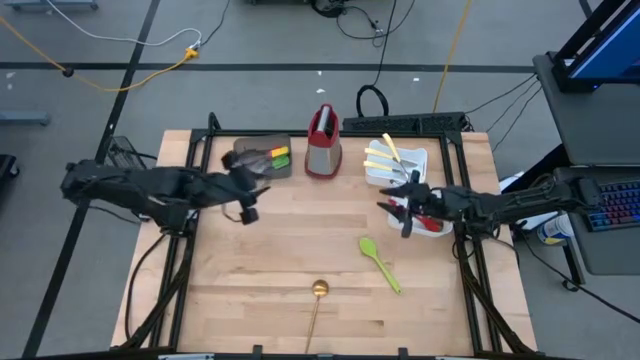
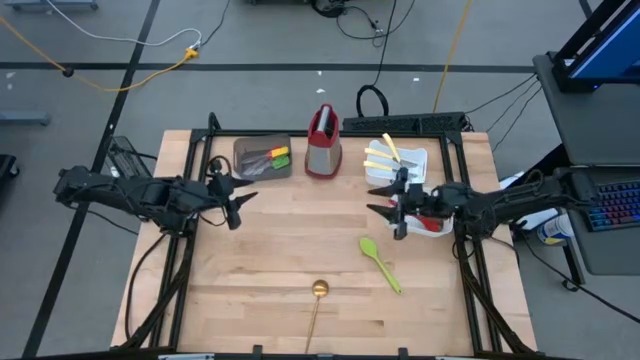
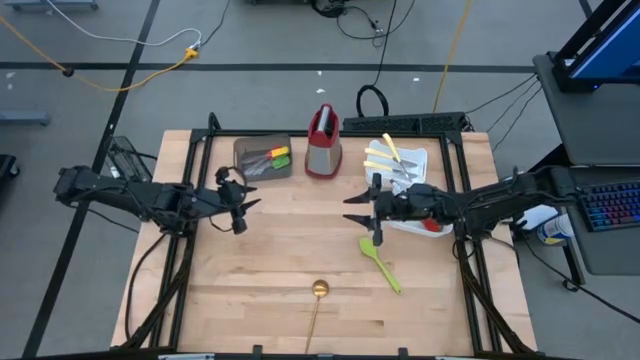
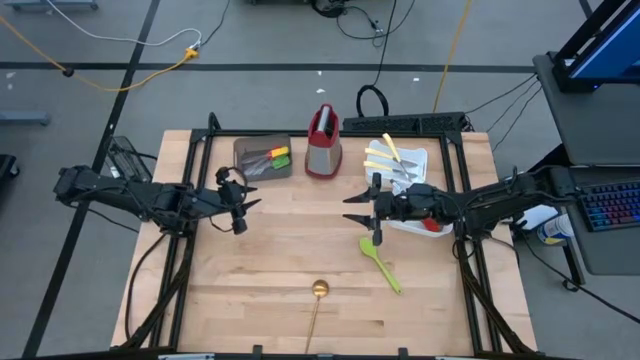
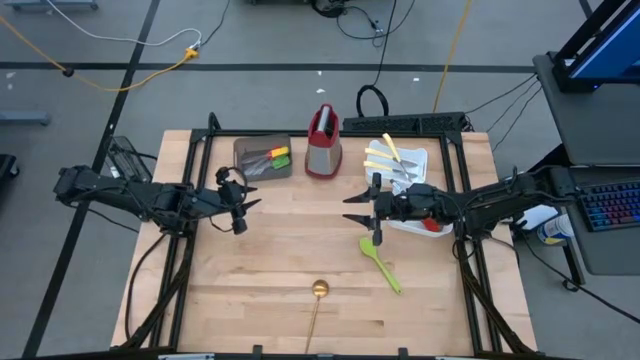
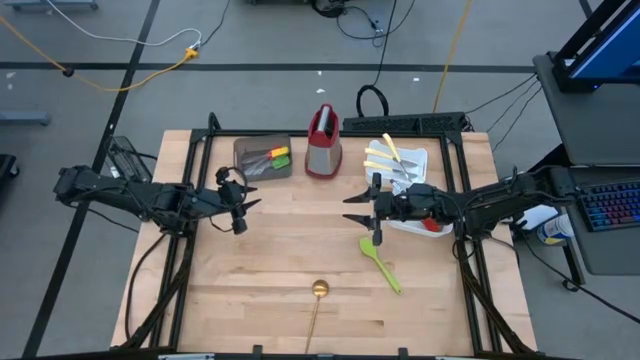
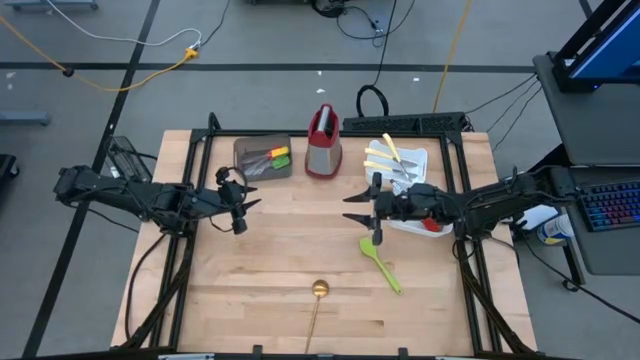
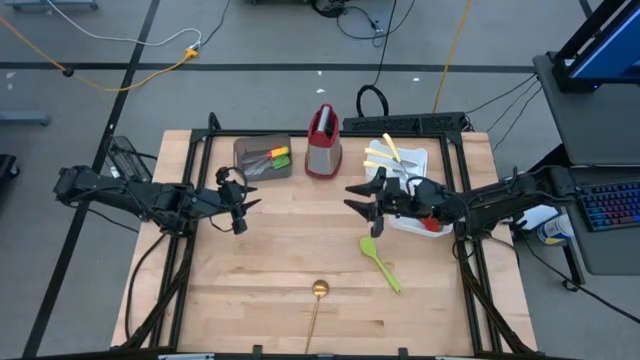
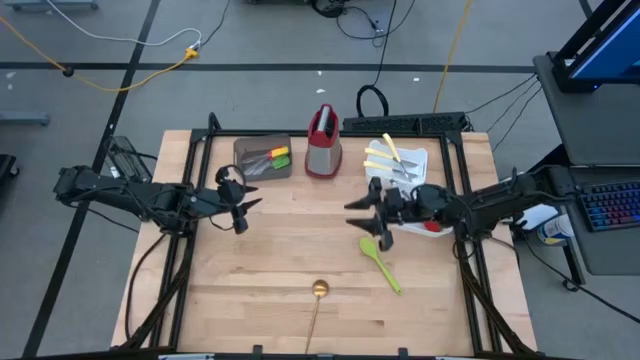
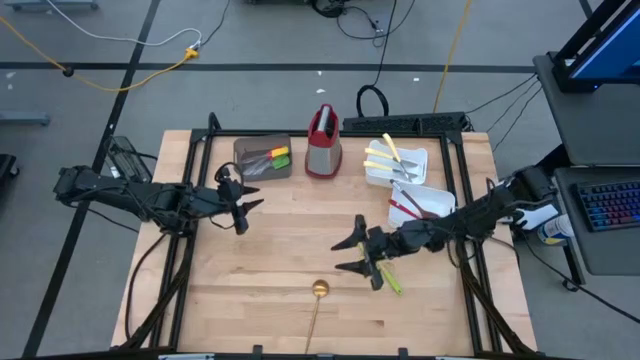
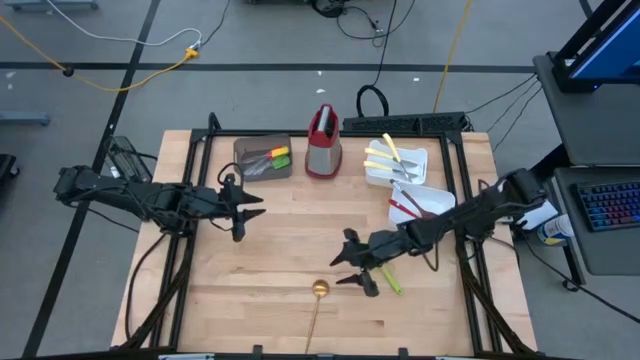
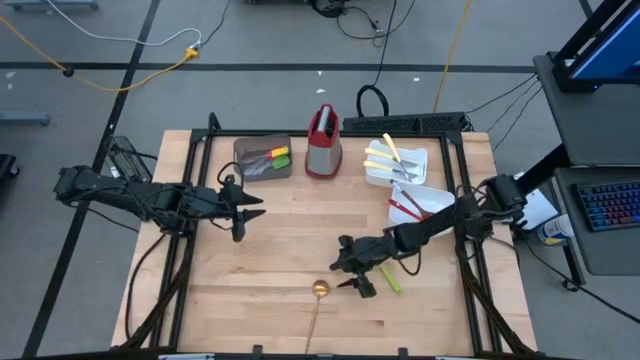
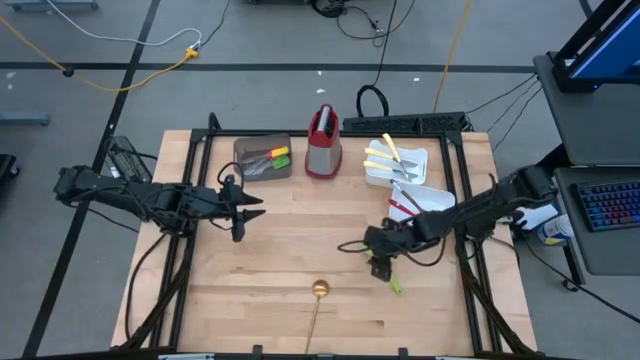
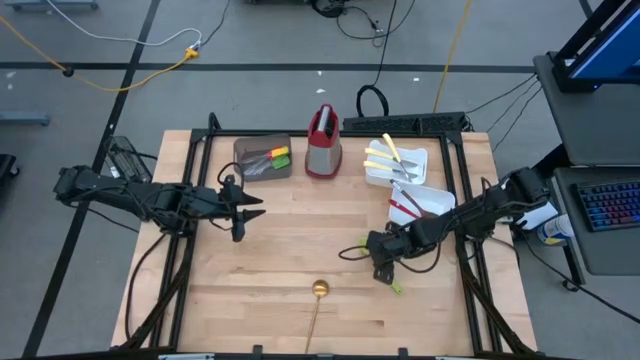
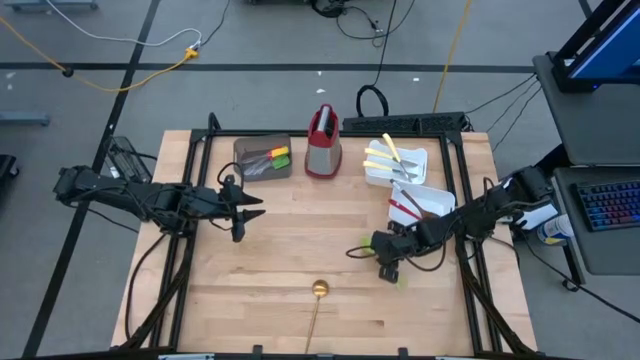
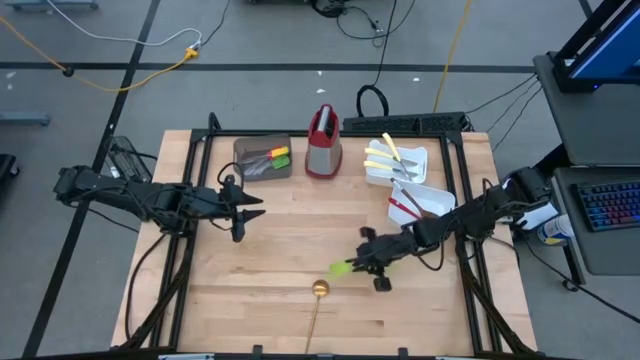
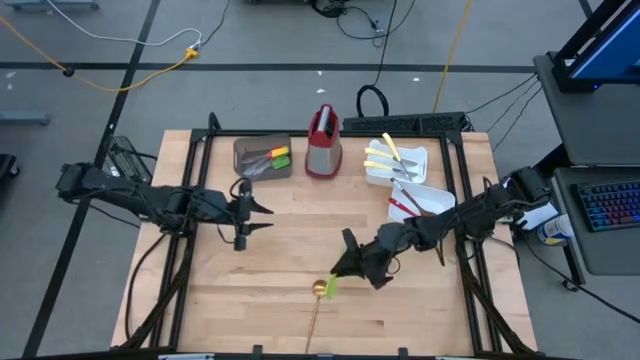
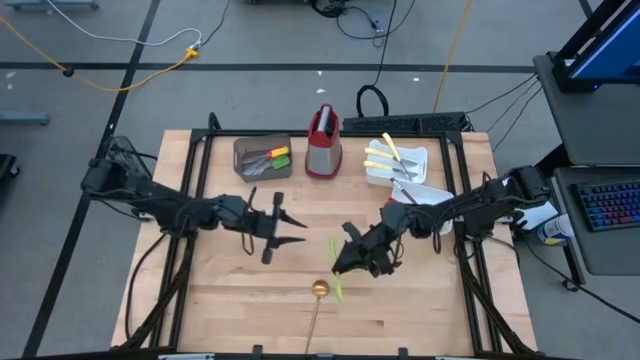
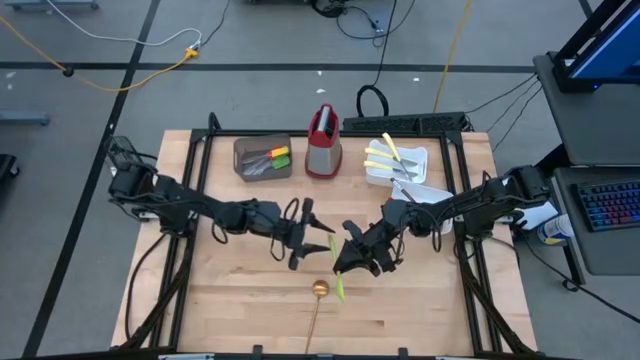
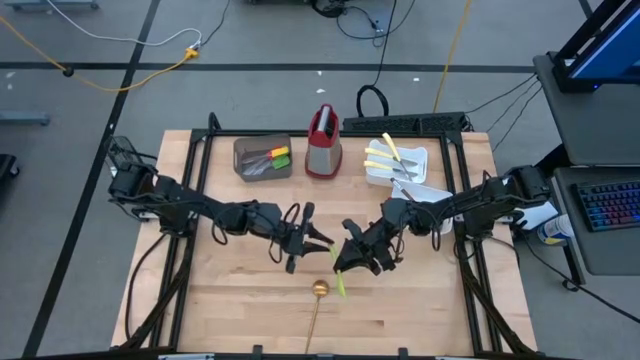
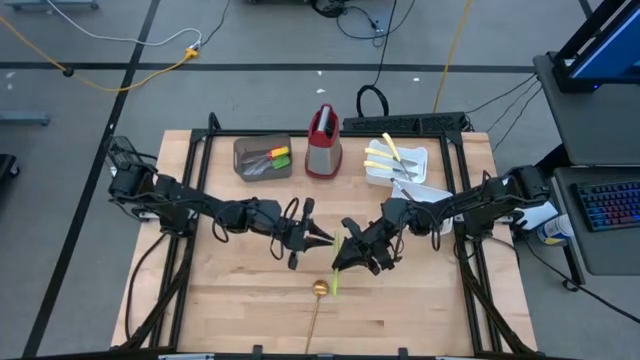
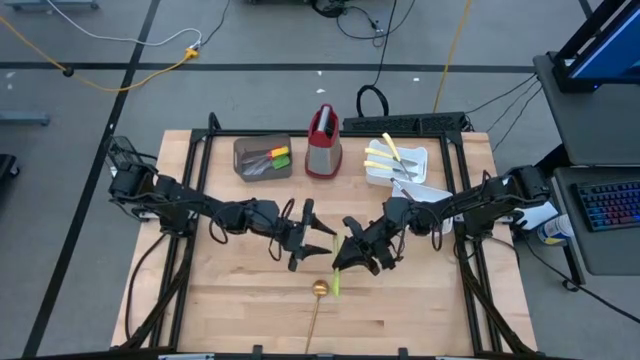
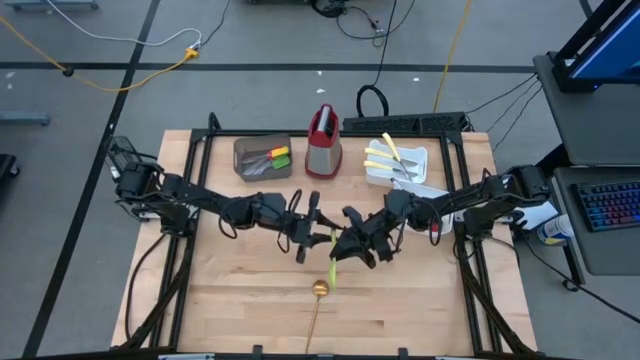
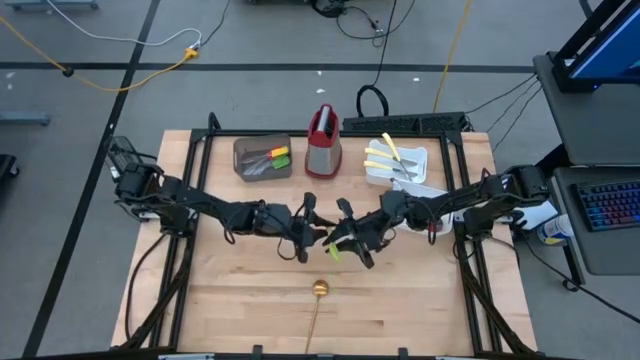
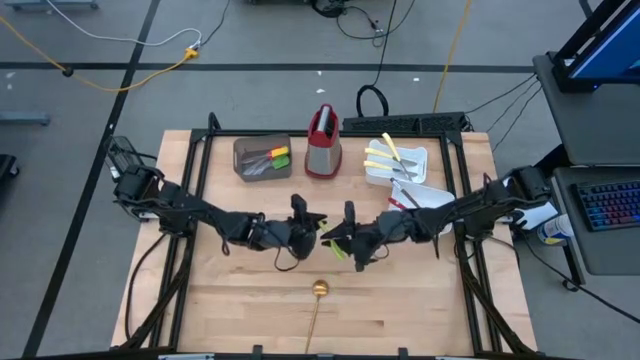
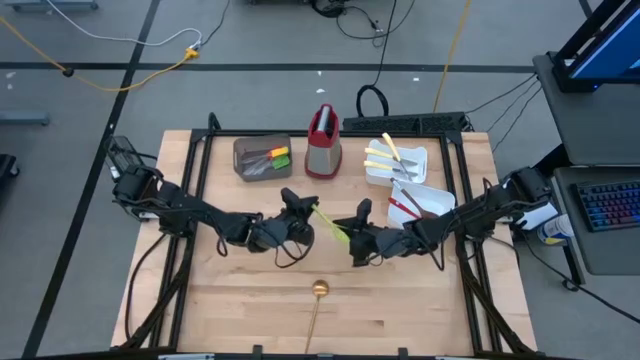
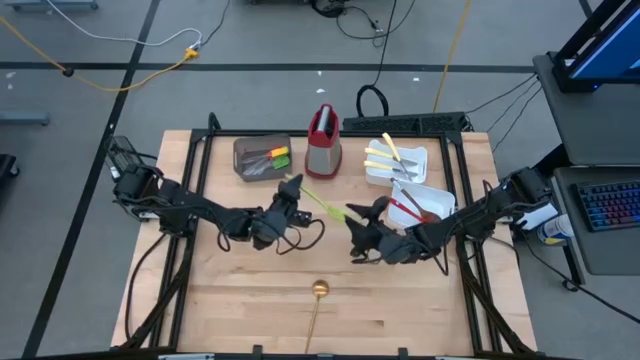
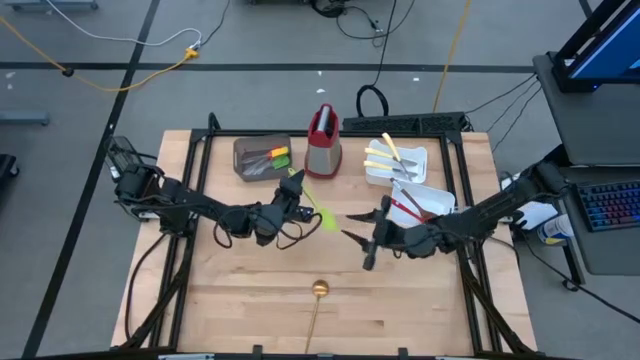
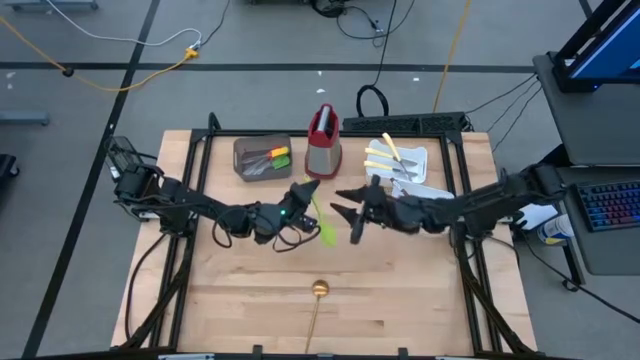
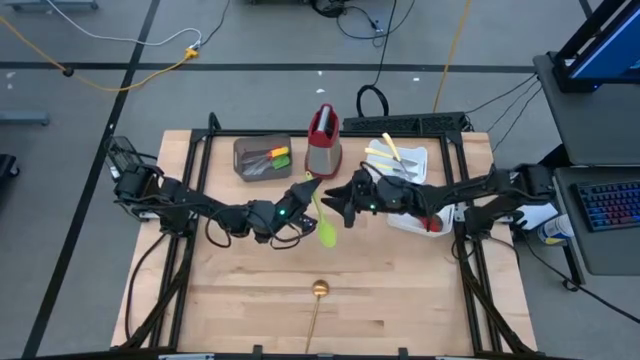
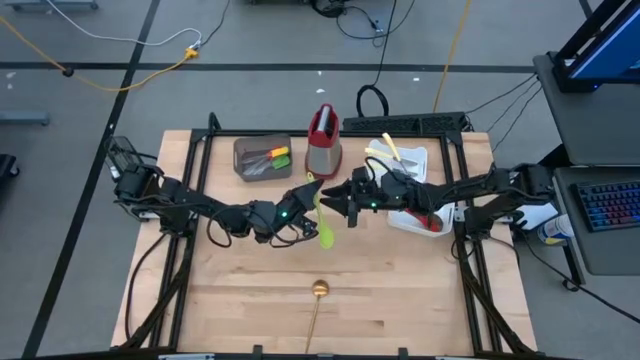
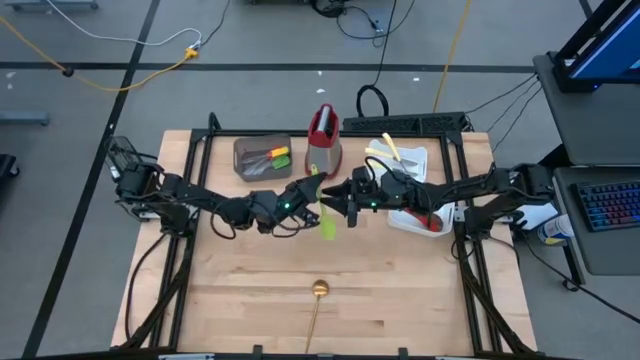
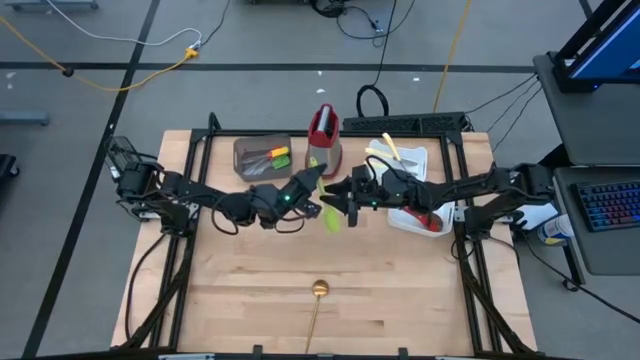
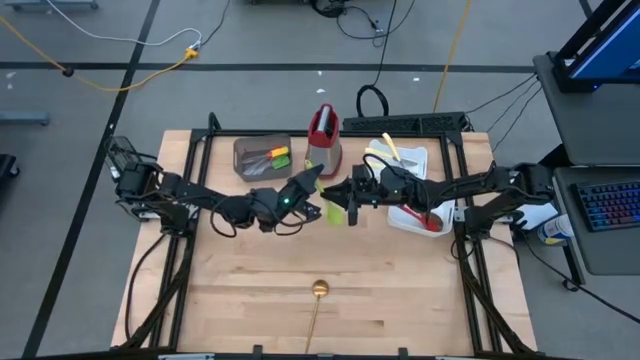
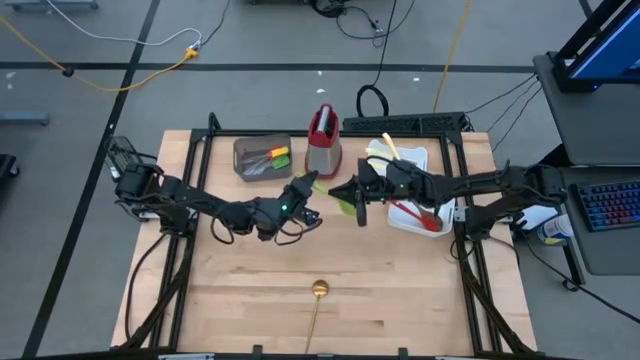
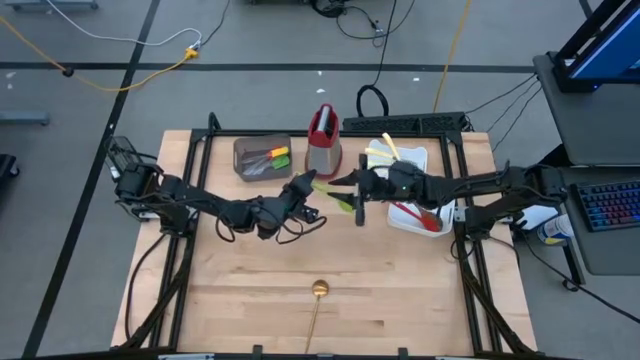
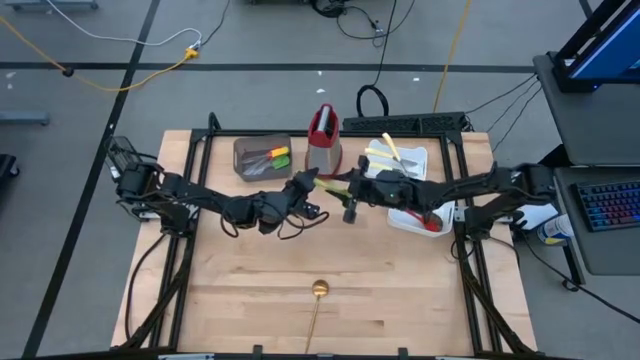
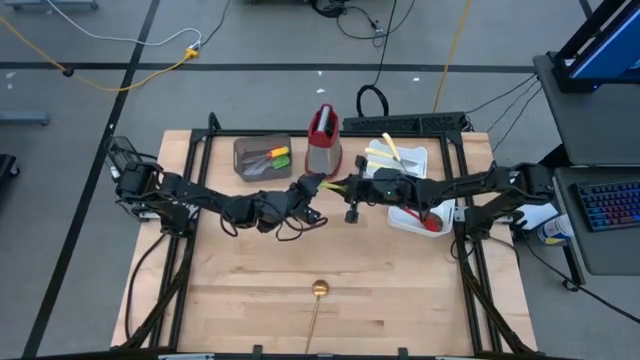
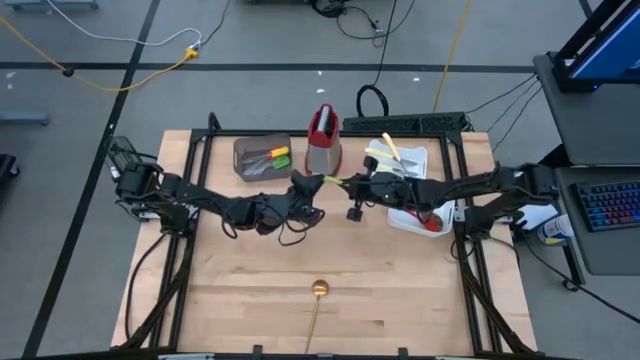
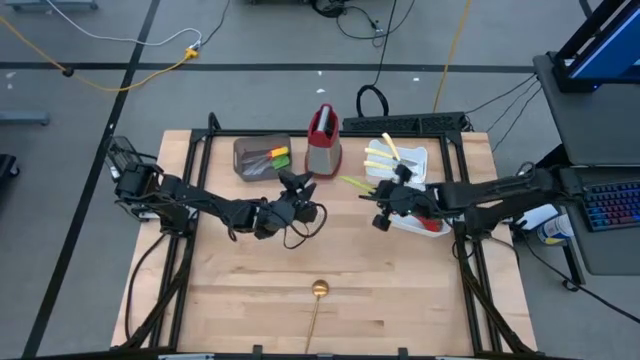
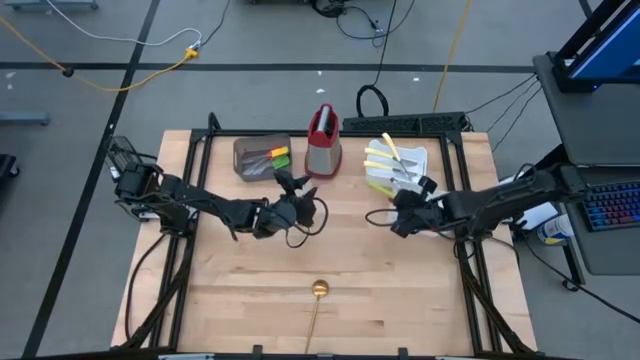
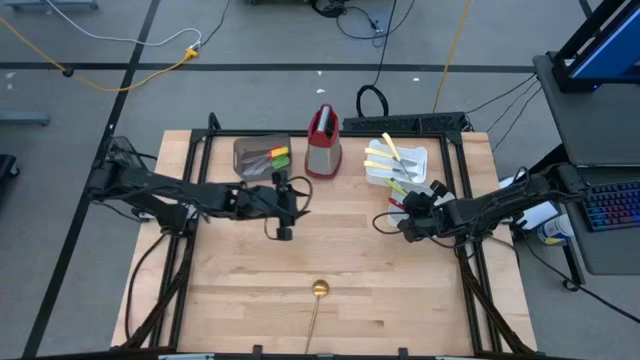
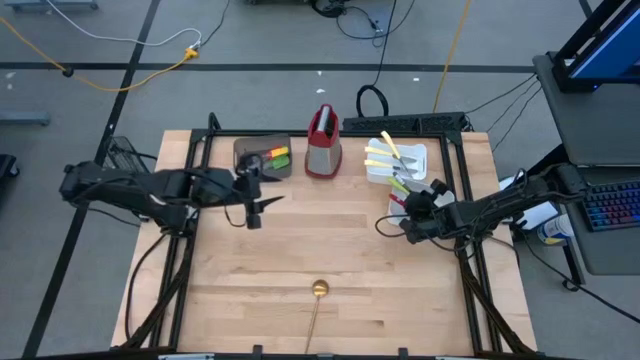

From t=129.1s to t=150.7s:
Task: Pick & Place Kitchen Items
Put the green serving spoon into the bottom white bin
